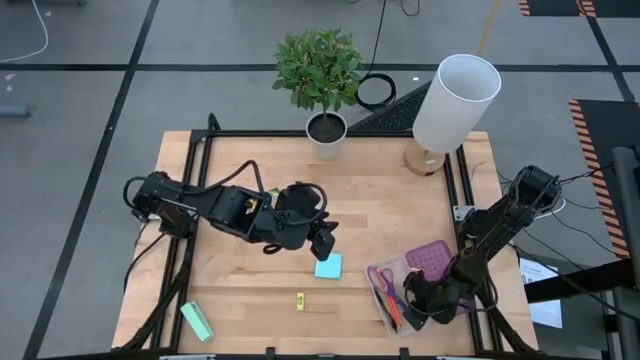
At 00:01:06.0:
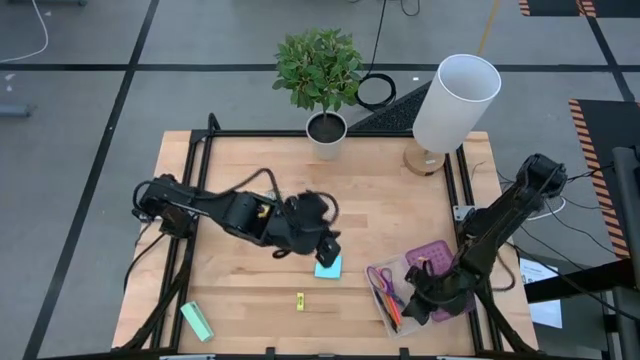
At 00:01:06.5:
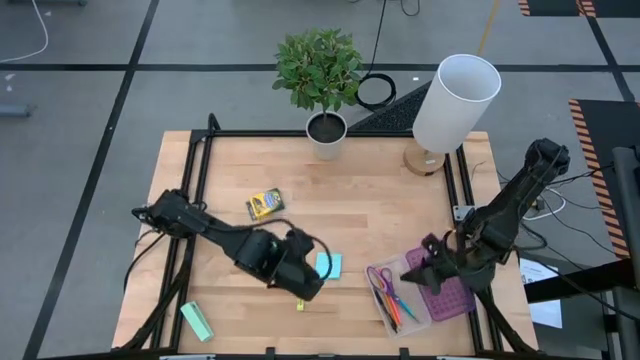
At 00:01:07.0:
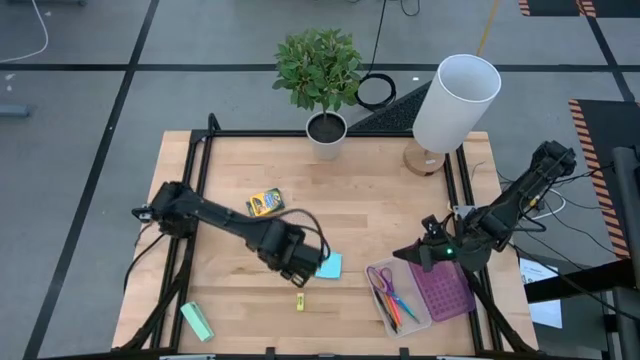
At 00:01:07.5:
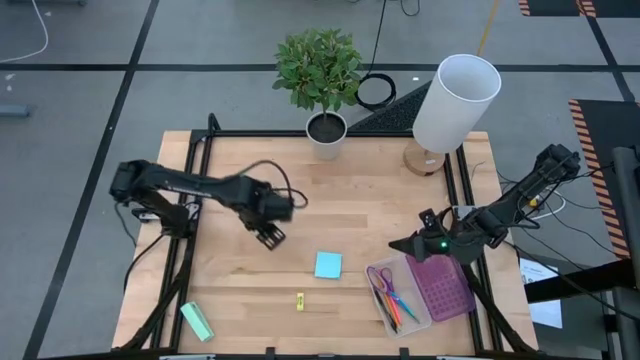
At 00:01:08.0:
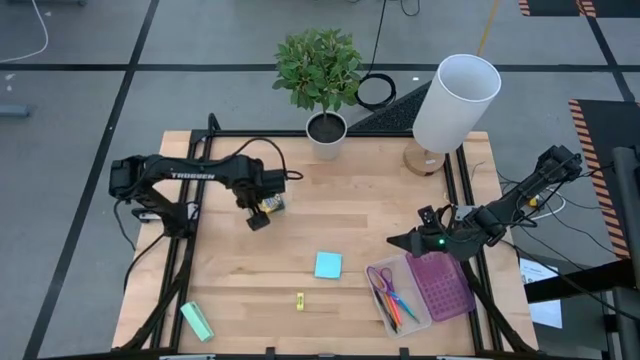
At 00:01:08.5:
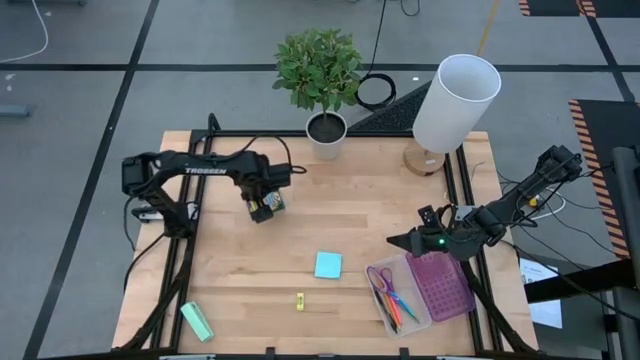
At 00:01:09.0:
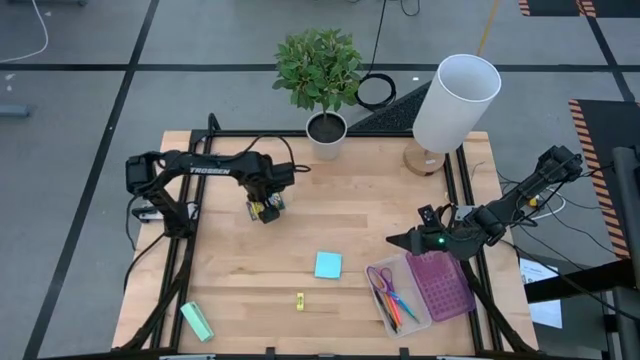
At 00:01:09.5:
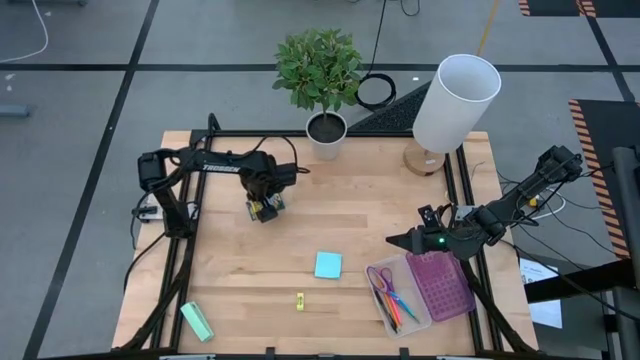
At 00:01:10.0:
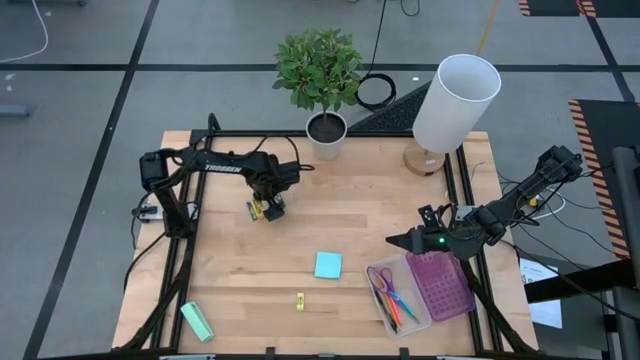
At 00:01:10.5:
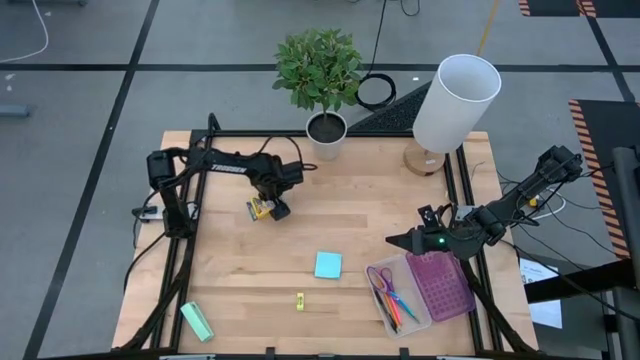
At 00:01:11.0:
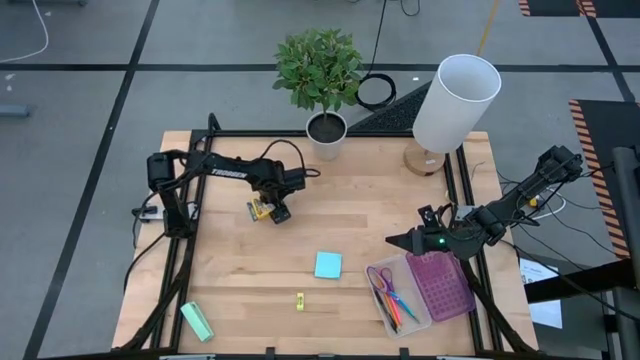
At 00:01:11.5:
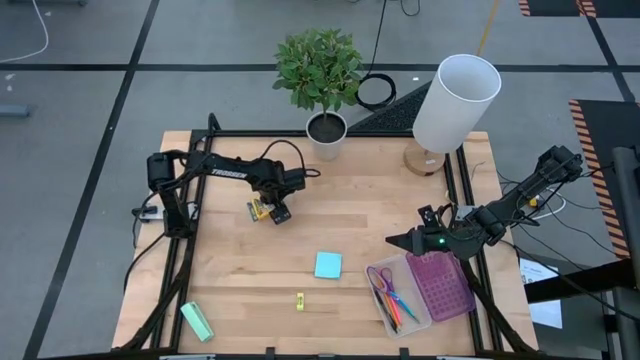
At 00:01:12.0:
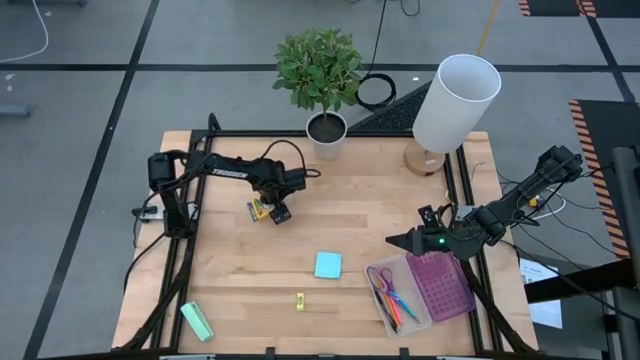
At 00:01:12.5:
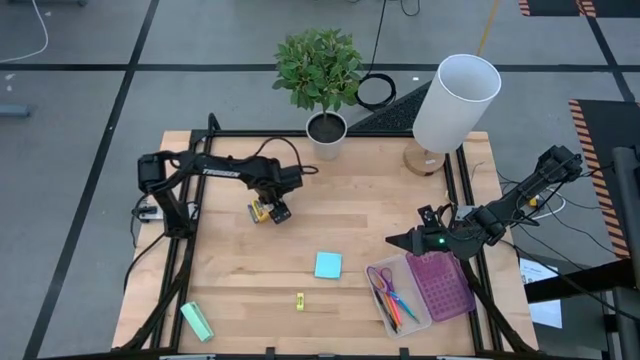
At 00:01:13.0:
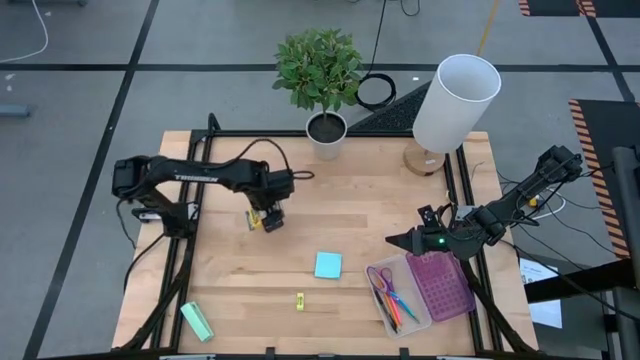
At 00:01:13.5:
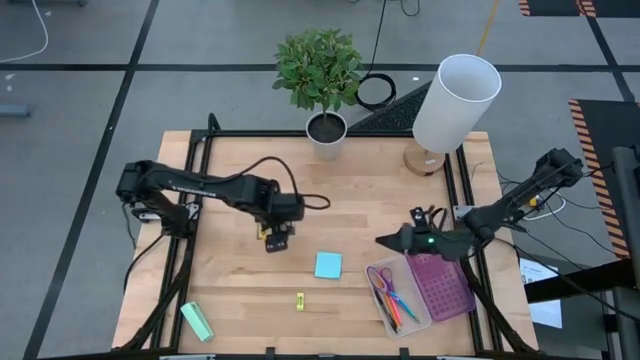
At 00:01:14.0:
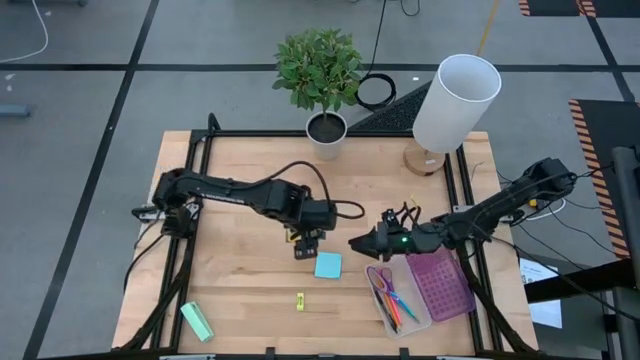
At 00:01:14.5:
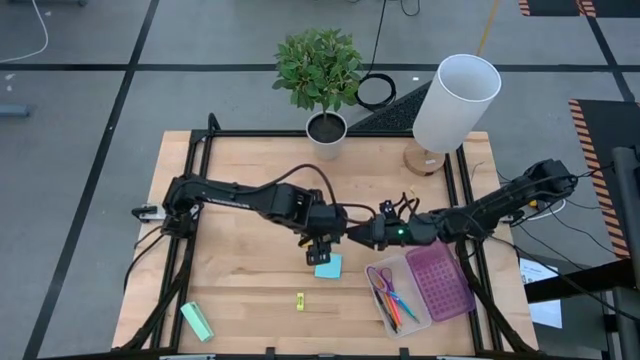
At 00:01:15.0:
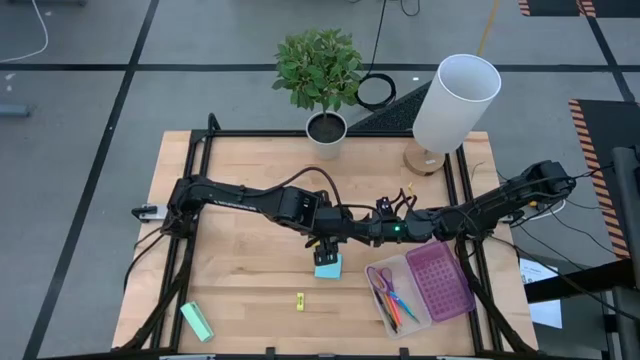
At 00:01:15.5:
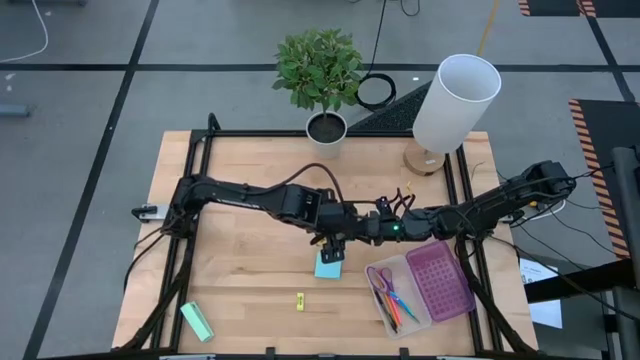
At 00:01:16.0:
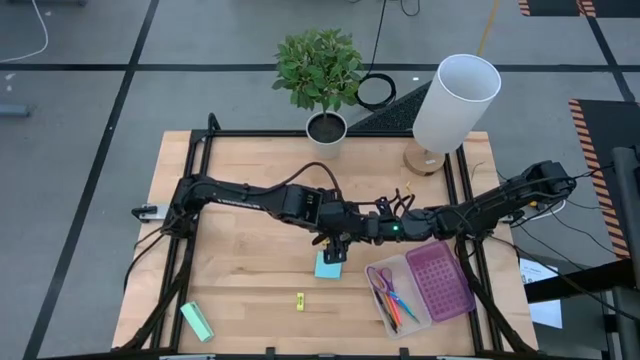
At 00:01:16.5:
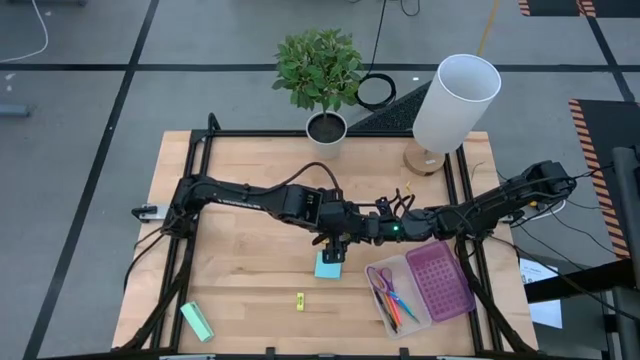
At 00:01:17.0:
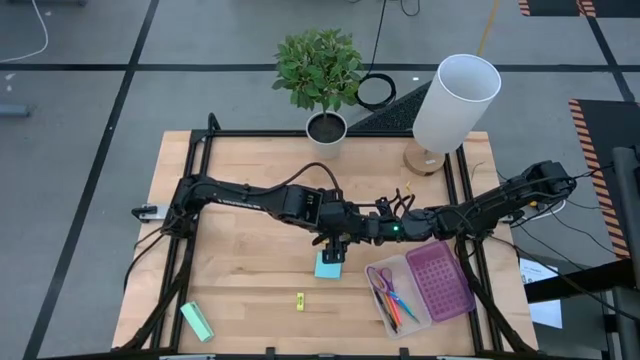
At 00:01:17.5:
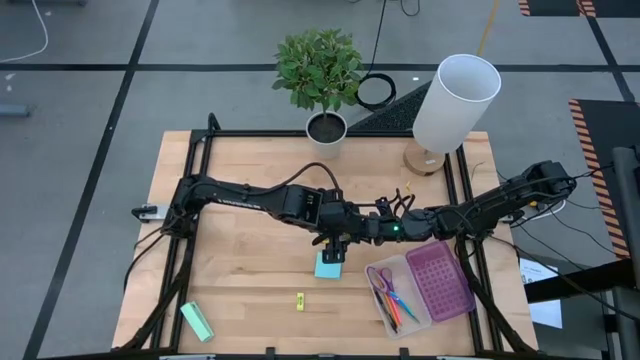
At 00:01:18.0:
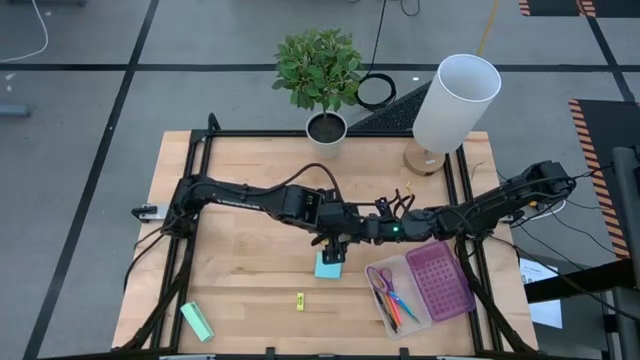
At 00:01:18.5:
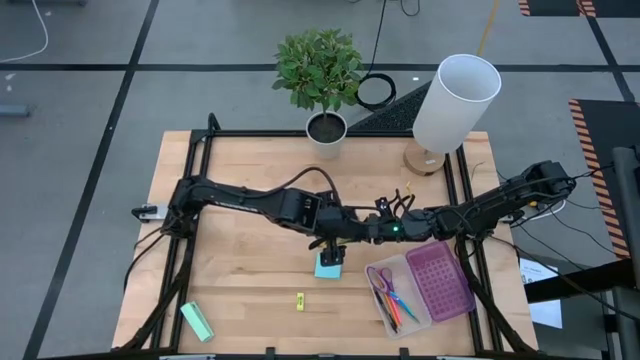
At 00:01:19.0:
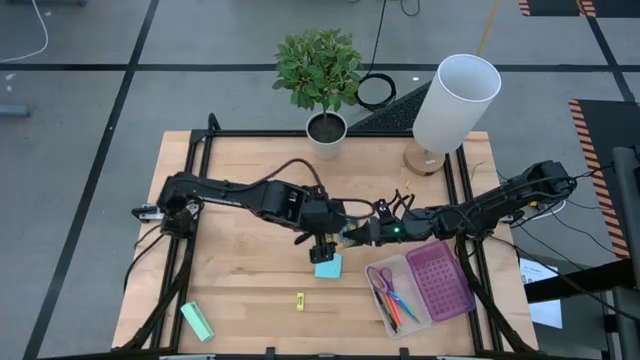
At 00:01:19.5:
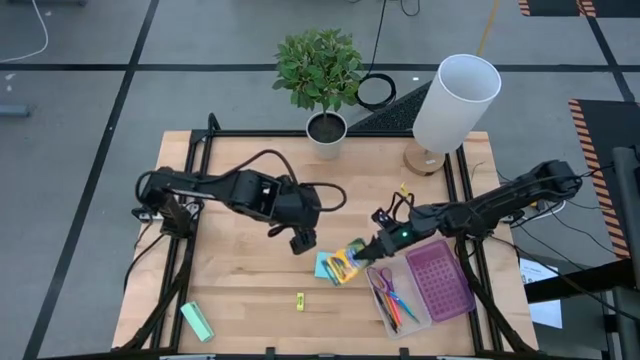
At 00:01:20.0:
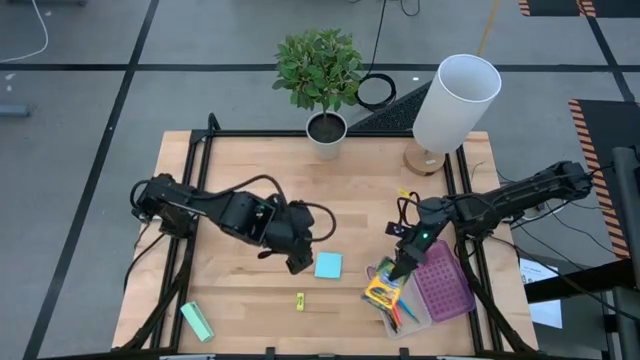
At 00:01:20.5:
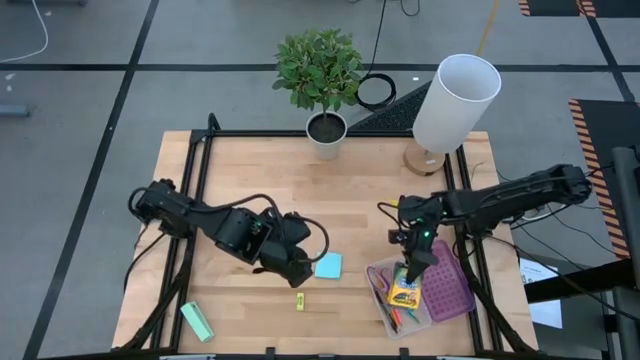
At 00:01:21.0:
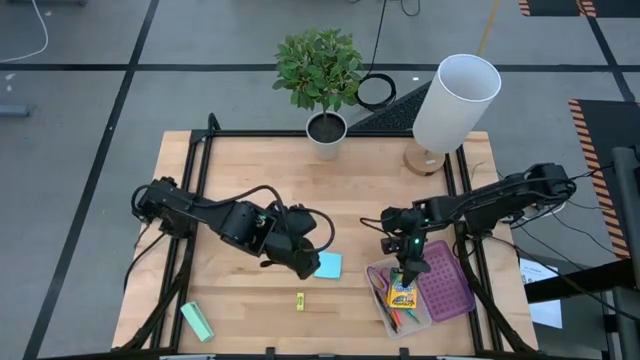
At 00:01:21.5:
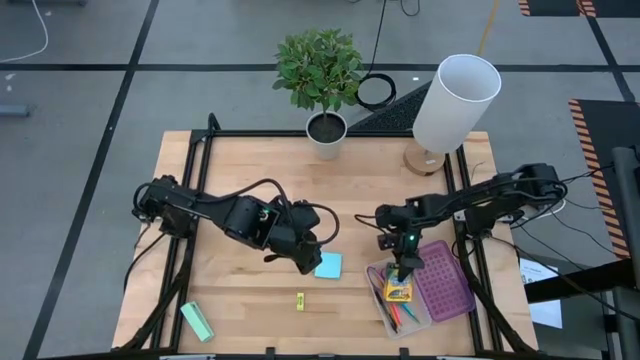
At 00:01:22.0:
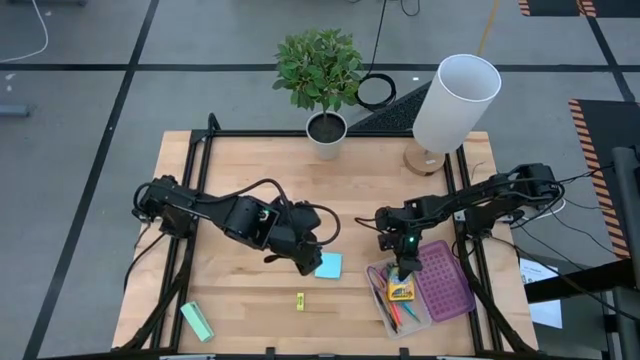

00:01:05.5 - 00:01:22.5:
Task: Pack school essentials
Put the yellow crayon box into the purple supply box
